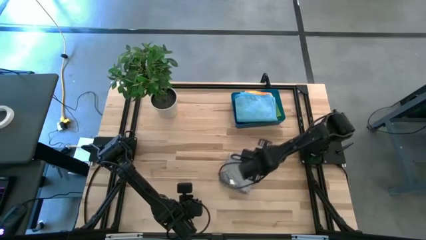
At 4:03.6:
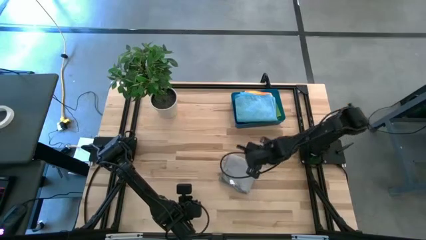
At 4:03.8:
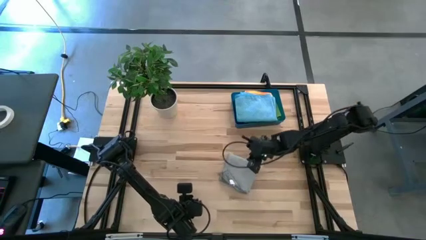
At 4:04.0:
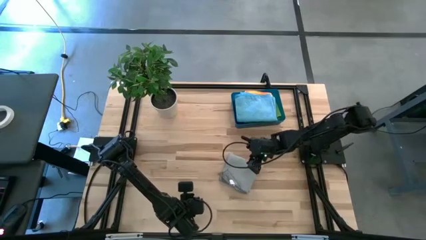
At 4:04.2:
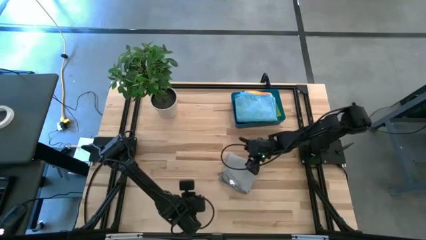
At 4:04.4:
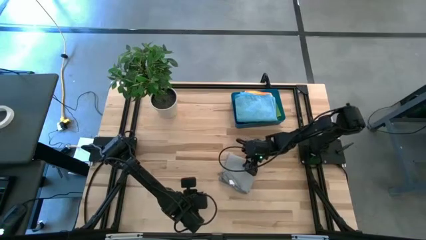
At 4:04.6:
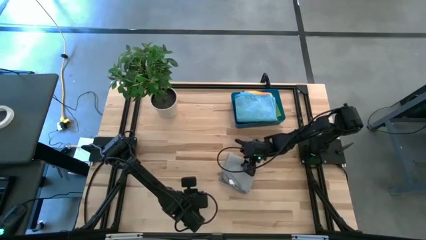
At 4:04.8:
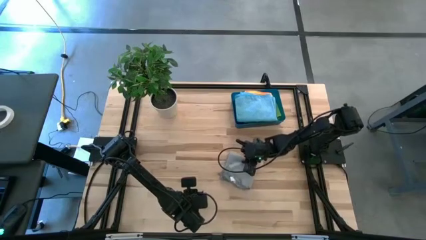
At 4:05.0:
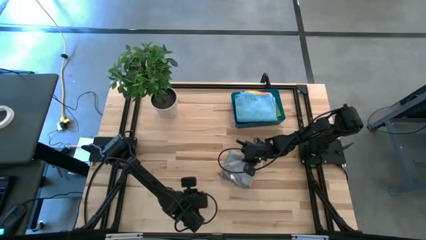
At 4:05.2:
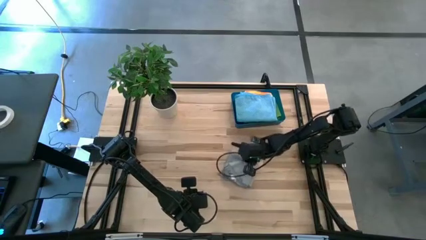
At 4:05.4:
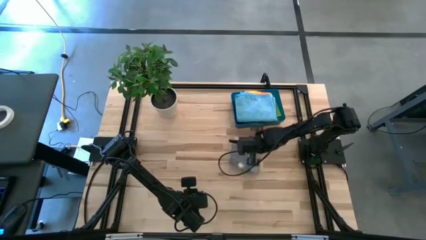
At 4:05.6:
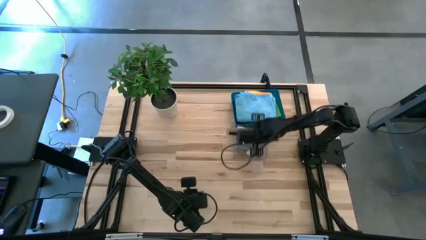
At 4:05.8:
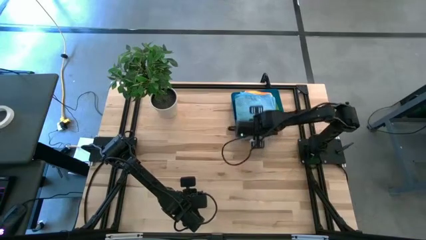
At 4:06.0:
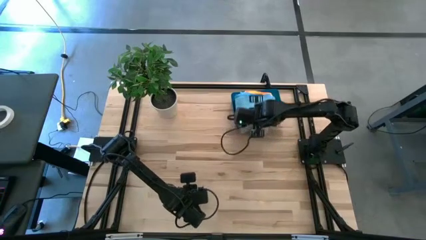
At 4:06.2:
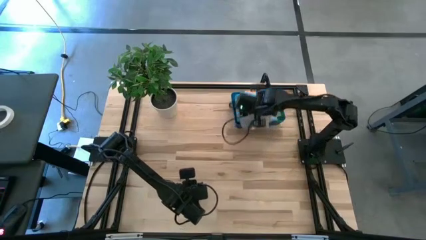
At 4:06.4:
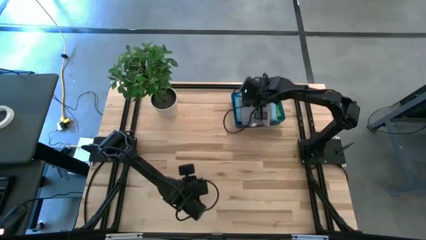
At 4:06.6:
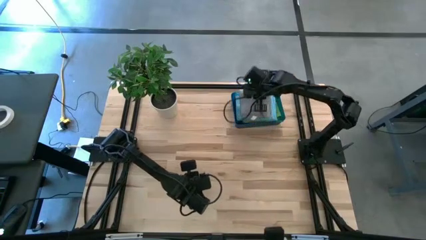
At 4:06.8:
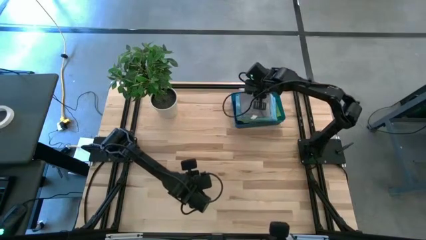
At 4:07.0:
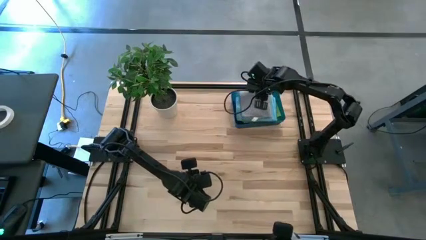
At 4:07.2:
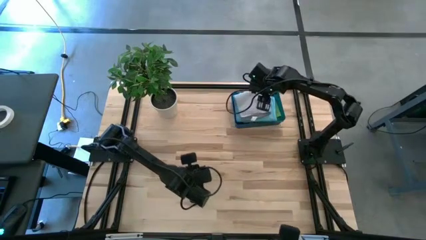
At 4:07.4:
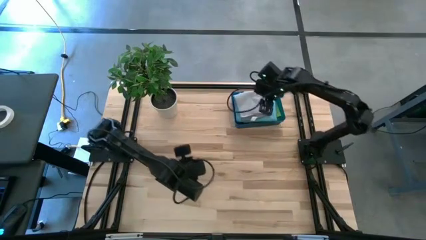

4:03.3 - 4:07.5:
Task: Fold microfiber towels
Put the gray microfiber cloth into the blue bin

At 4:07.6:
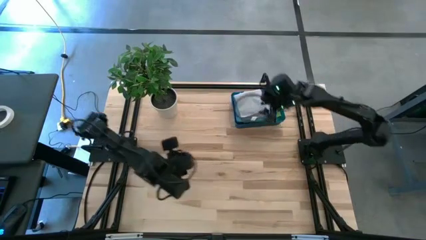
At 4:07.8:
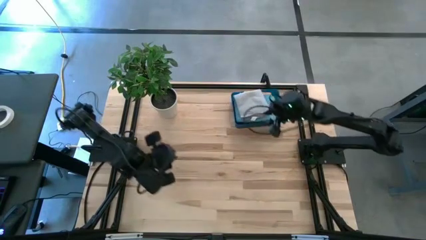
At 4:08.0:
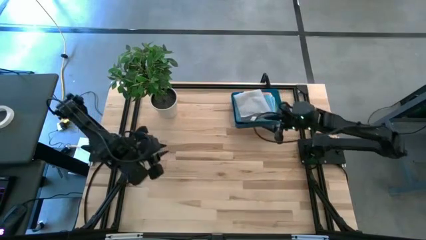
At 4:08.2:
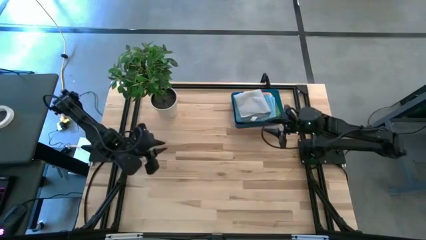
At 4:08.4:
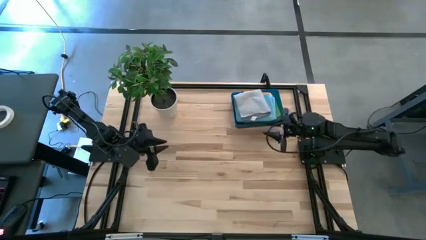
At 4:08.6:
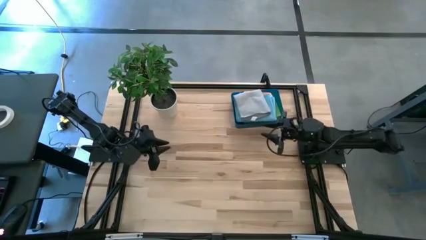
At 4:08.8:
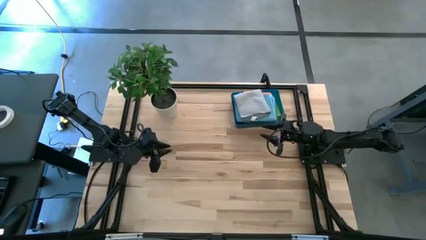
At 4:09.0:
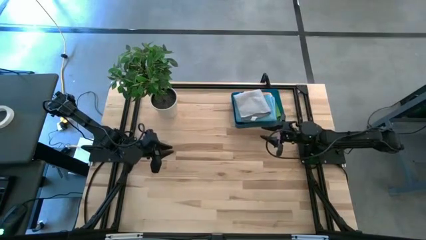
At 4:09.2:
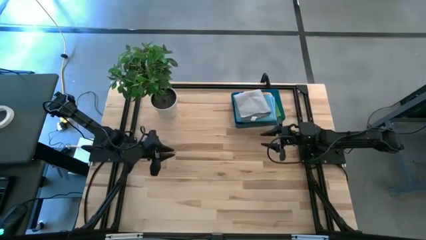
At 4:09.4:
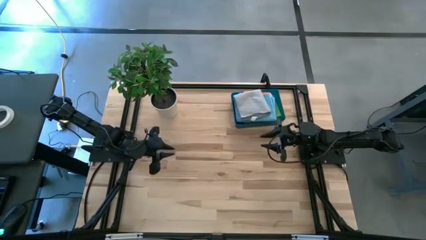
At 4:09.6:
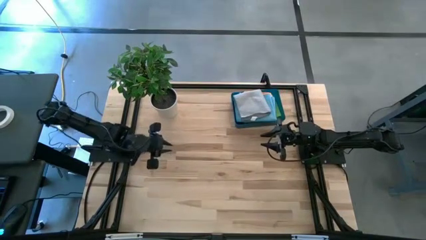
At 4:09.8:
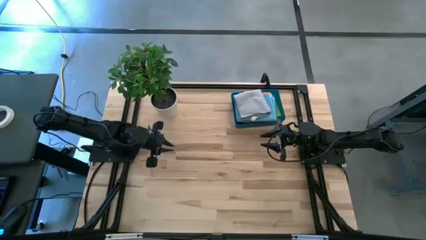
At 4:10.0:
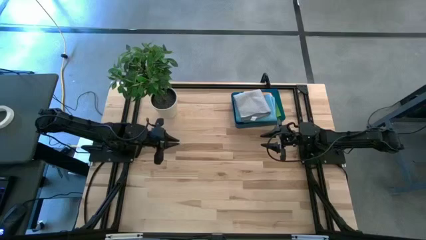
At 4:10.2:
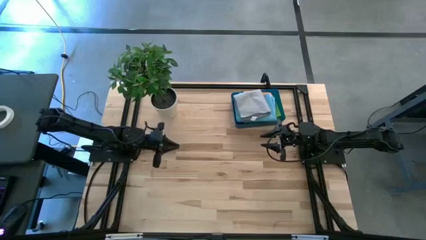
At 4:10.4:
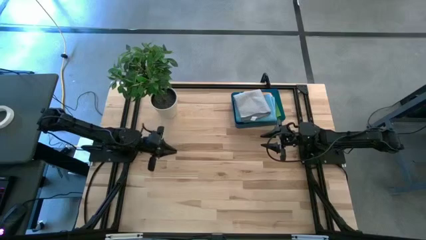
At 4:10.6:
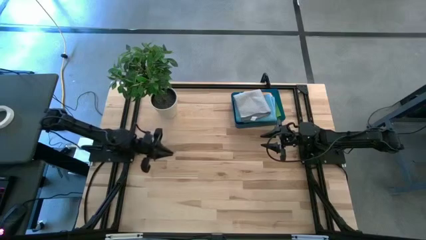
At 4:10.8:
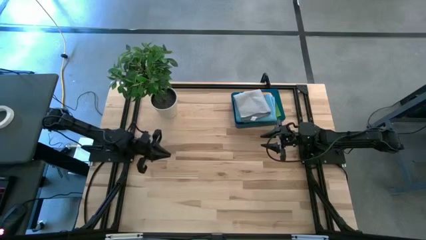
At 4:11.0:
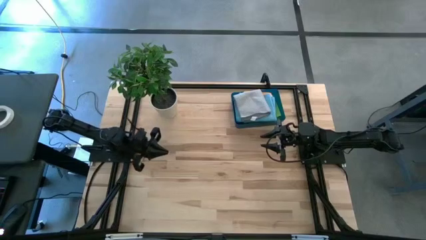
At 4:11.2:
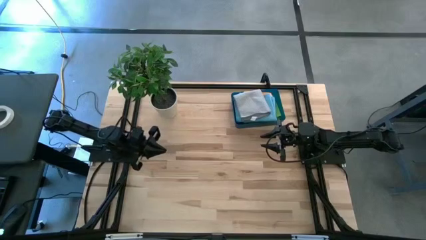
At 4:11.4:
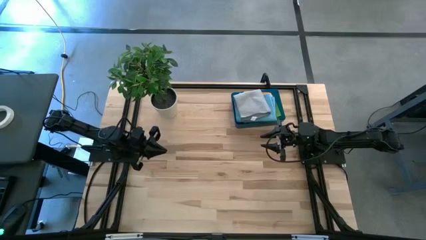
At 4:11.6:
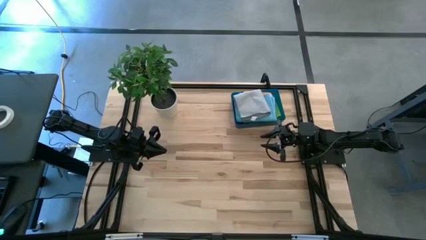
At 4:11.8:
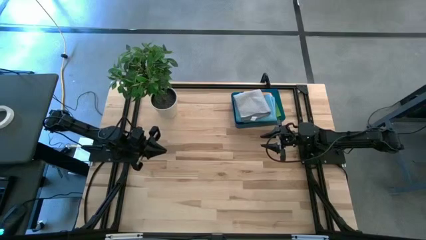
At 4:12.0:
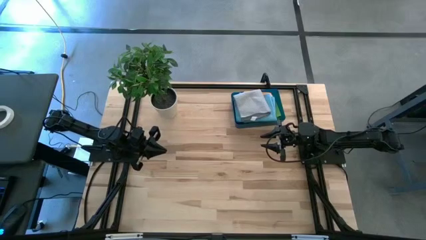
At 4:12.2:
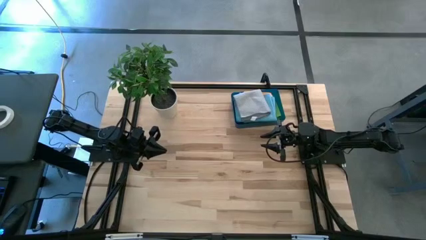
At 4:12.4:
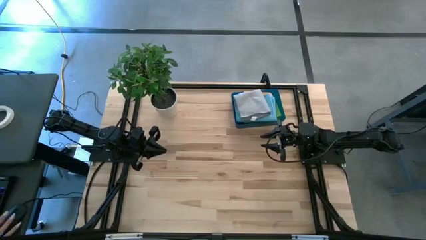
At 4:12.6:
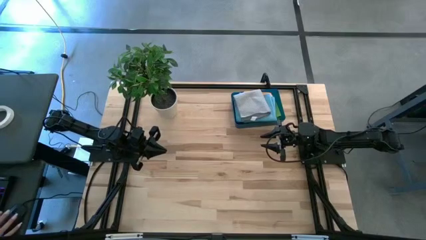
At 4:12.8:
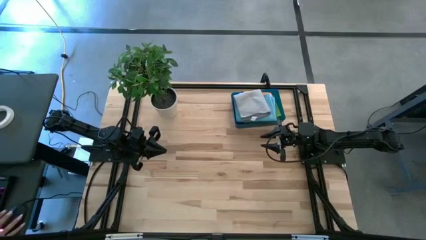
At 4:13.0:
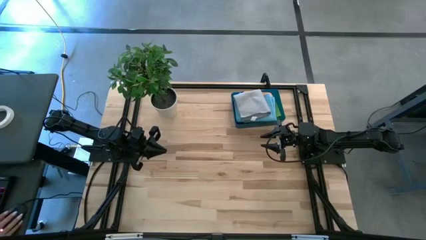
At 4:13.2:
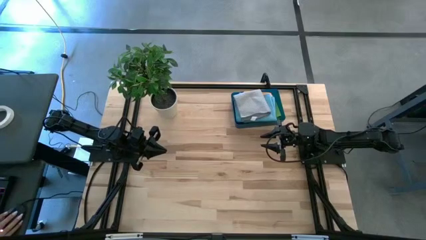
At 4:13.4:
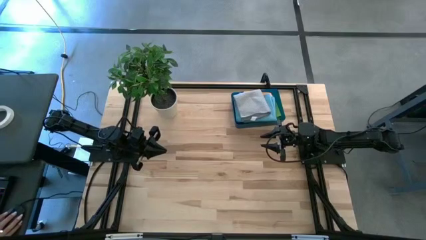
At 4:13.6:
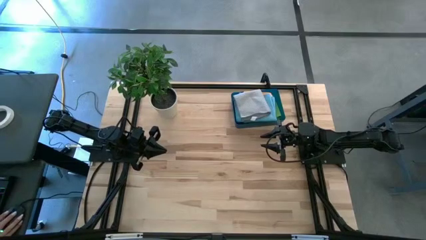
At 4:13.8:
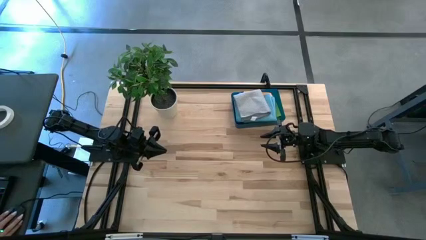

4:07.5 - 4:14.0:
Return to Home Position

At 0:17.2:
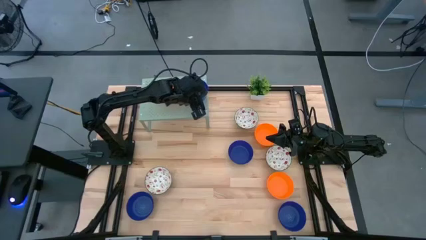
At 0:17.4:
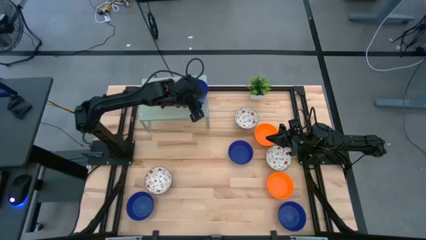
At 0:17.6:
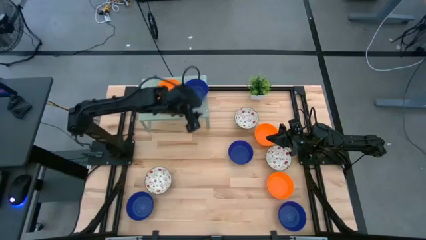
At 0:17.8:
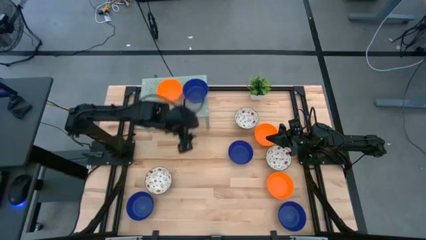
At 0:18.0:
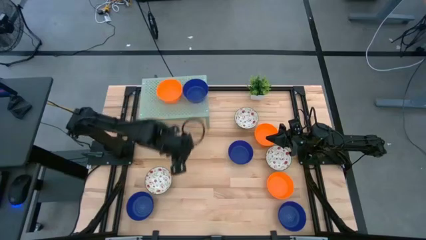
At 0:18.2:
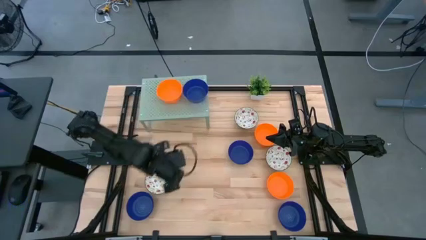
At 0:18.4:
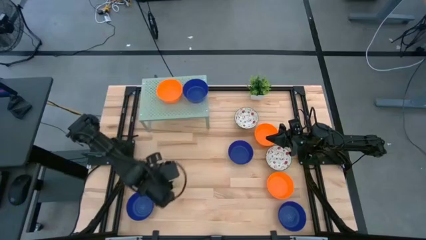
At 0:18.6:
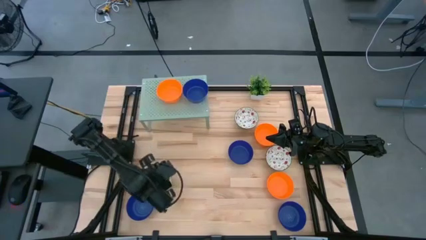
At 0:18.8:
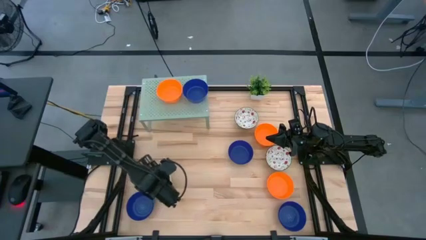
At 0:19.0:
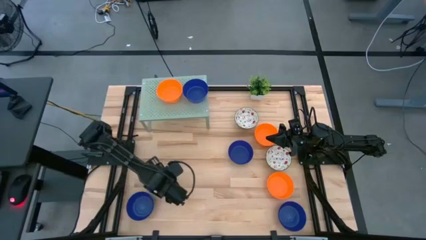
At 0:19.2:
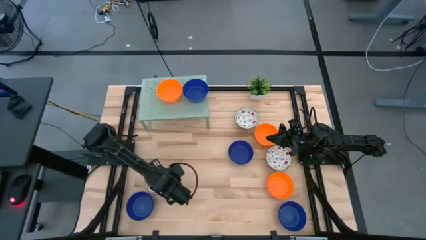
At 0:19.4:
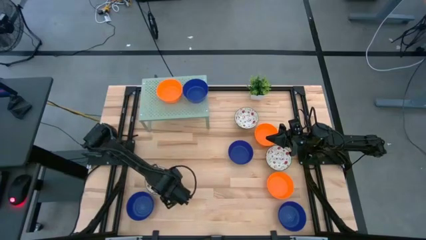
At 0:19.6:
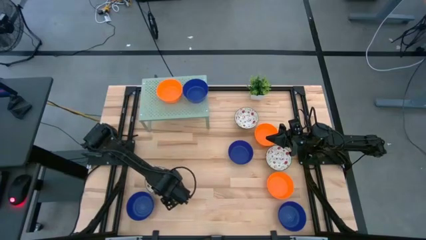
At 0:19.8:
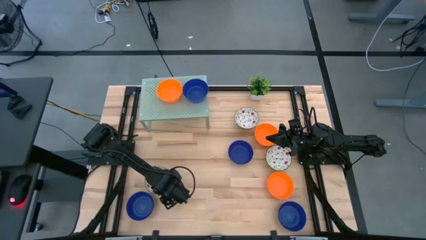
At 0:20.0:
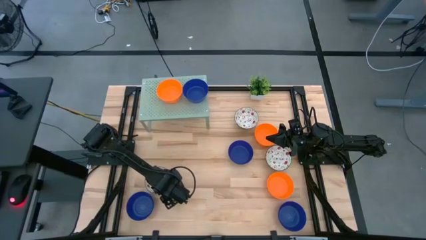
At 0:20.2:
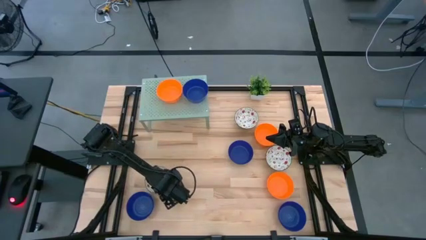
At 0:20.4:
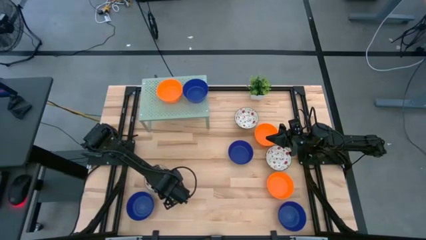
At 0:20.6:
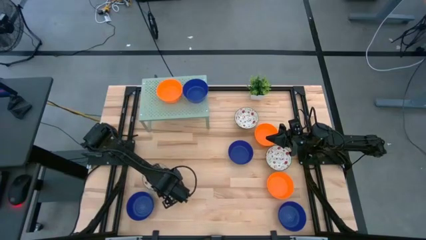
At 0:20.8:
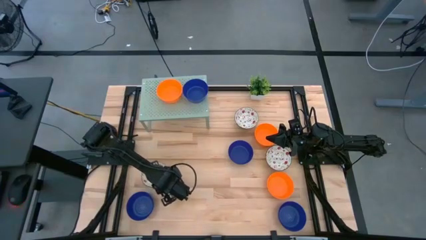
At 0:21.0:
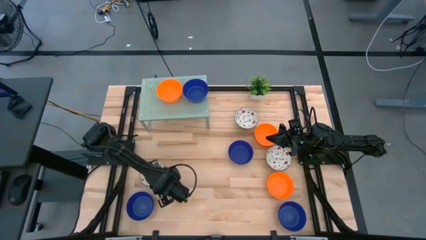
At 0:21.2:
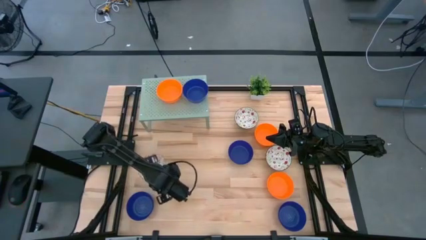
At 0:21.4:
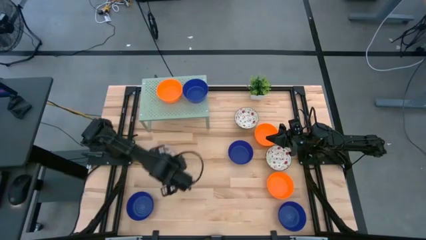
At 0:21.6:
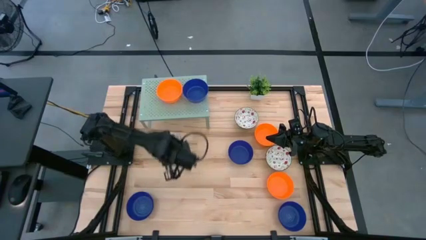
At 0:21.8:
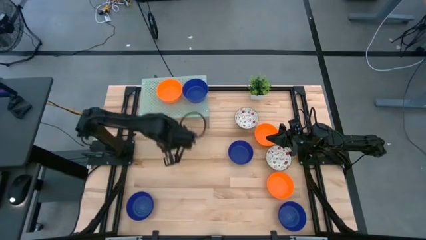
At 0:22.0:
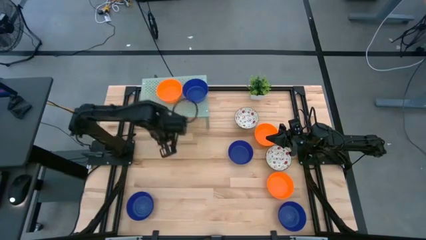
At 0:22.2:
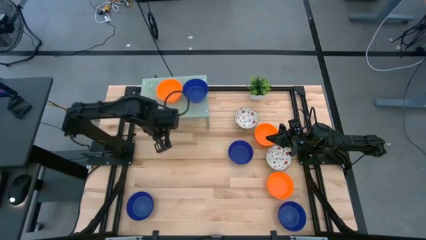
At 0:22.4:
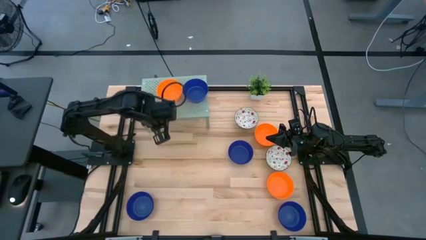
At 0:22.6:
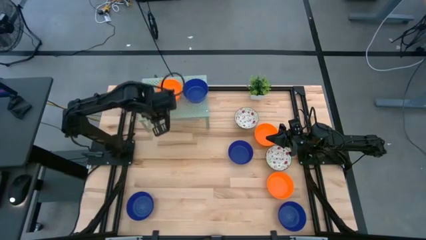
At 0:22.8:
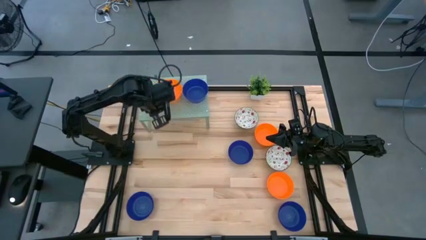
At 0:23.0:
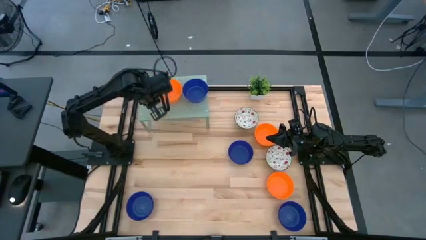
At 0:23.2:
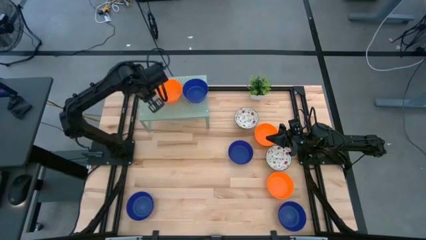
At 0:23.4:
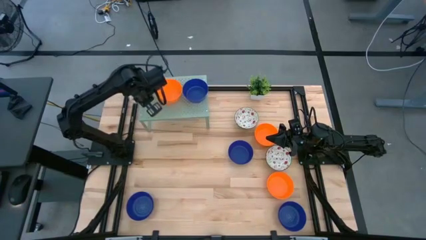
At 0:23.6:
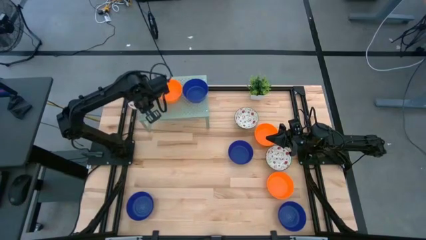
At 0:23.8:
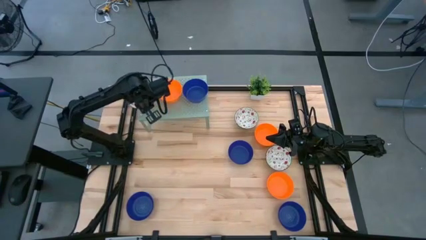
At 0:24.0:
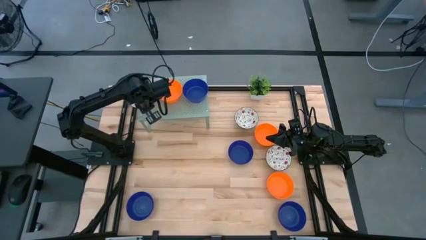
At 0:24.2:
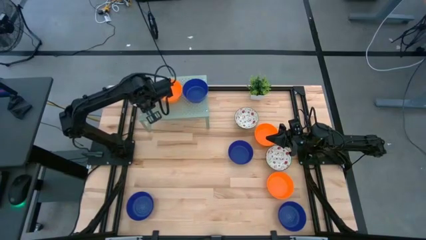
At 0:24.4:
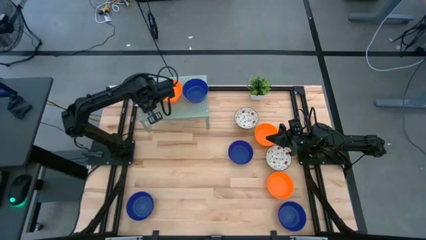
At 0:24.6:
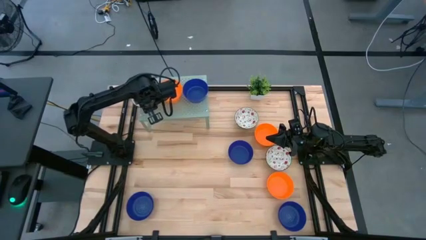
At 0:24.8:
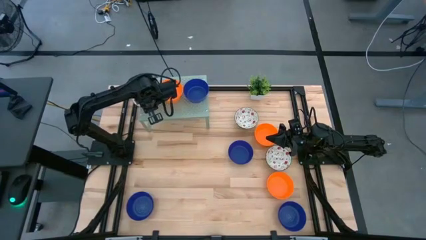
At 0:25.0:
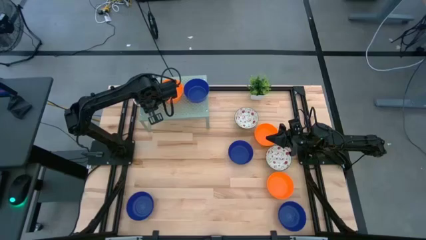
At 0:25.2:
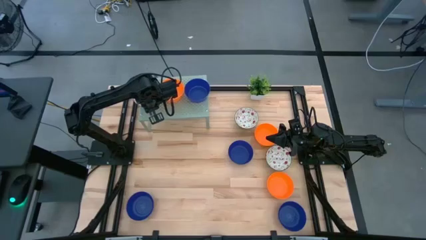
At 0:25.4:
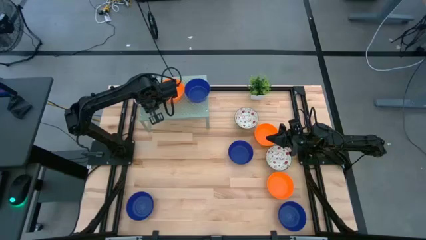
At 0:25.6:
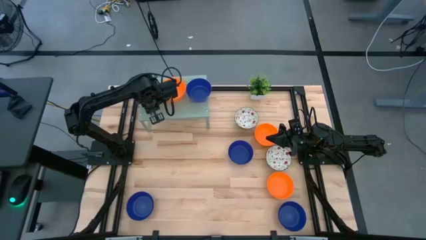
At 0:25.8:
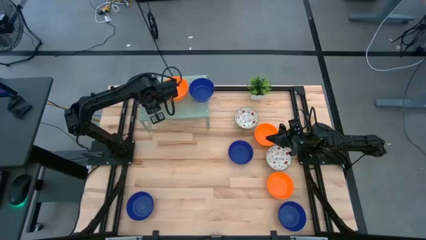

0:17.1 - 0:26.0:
Task: Pick & Place Mini bowls
Put the white patterned bowl on the shelf
